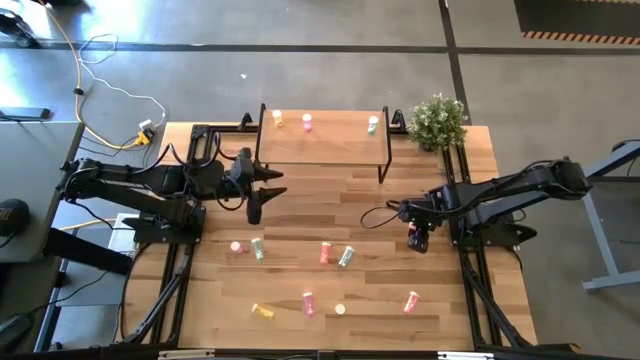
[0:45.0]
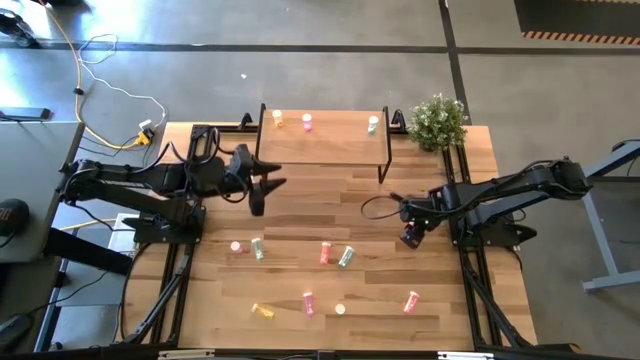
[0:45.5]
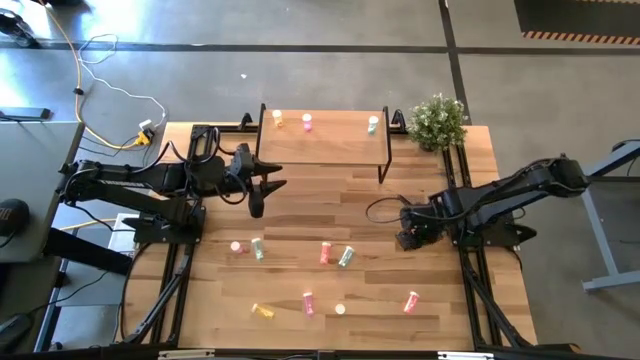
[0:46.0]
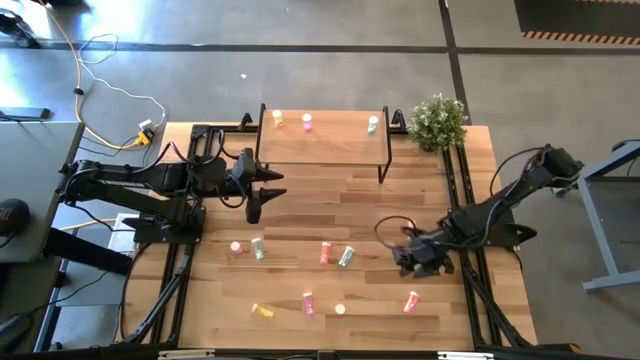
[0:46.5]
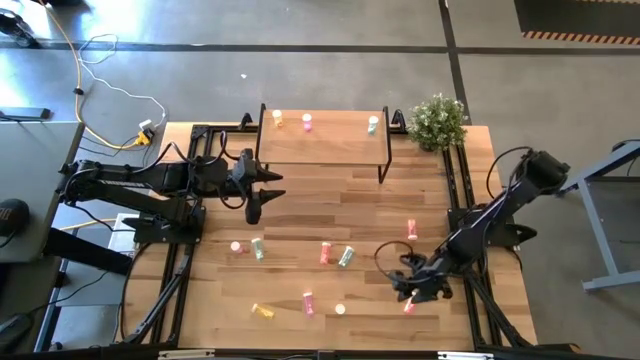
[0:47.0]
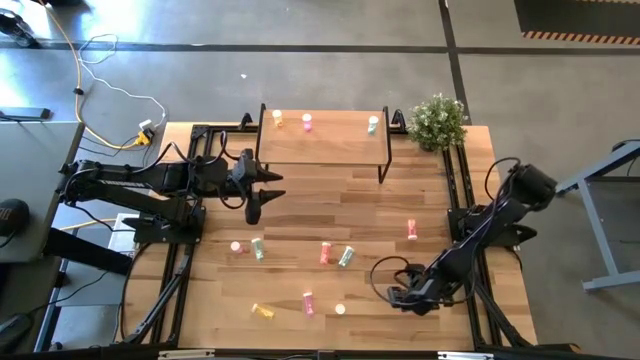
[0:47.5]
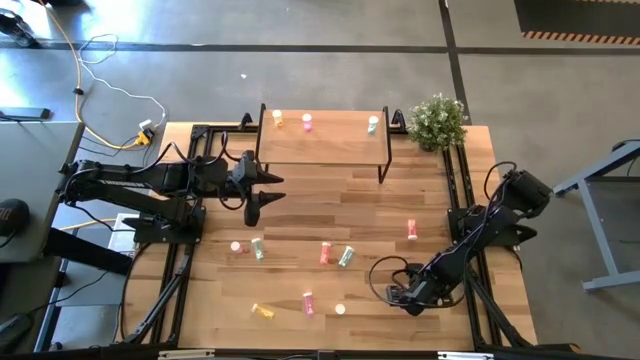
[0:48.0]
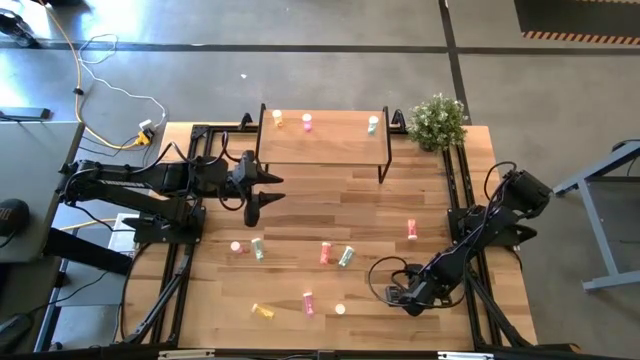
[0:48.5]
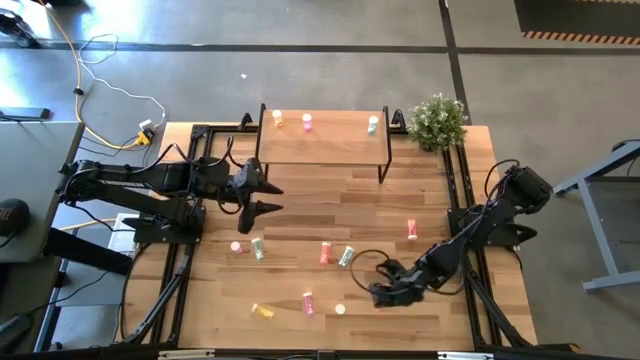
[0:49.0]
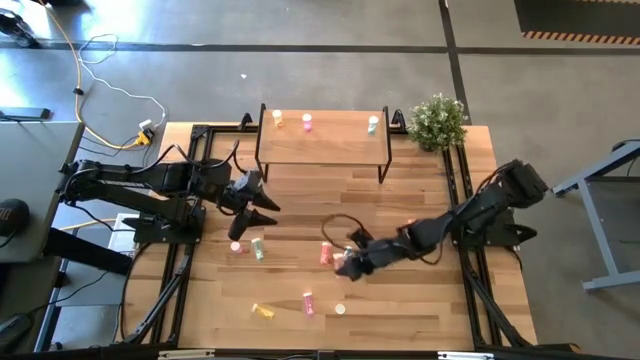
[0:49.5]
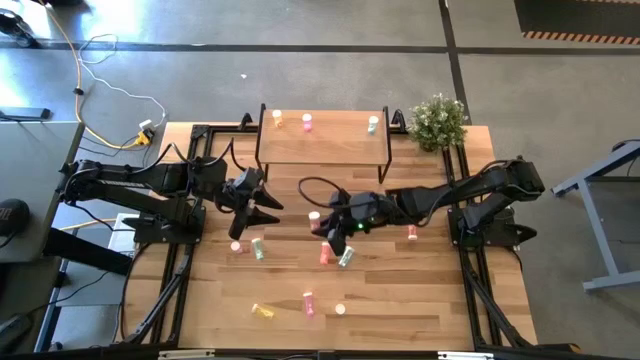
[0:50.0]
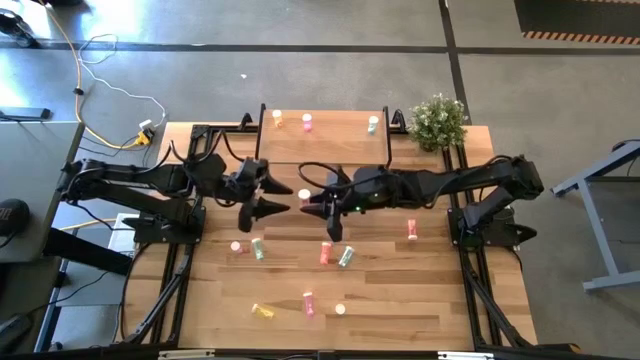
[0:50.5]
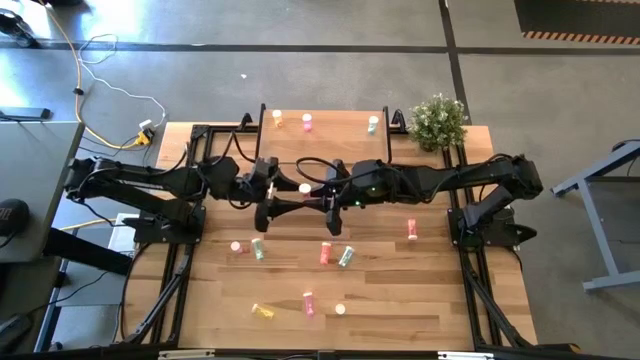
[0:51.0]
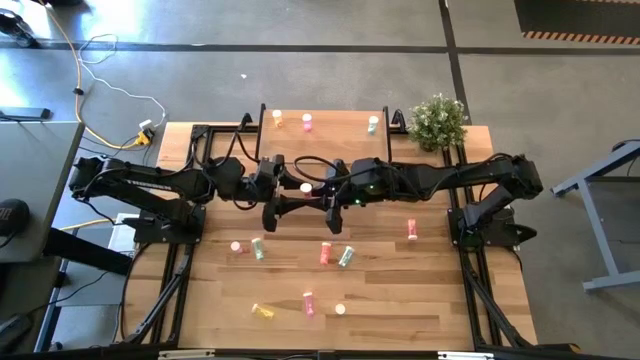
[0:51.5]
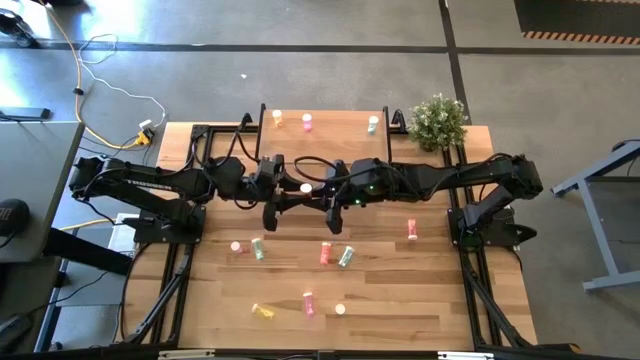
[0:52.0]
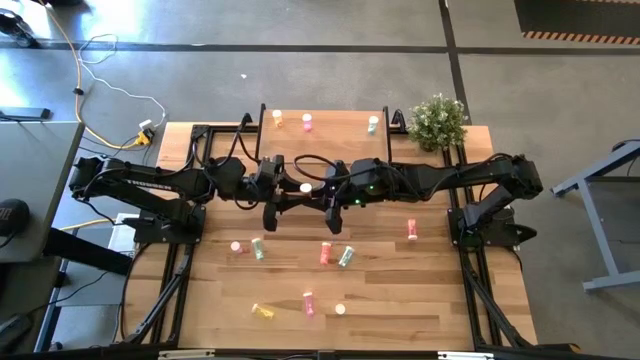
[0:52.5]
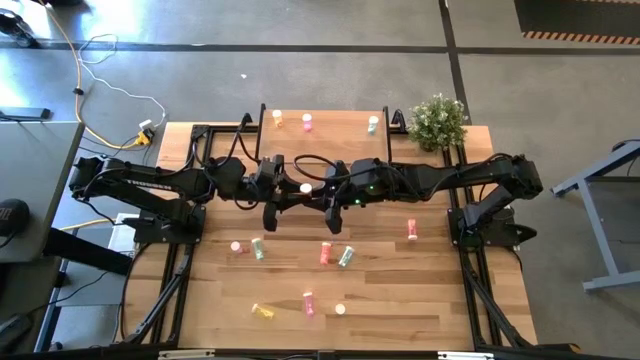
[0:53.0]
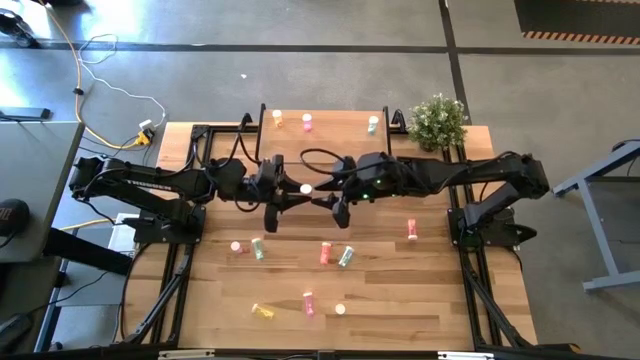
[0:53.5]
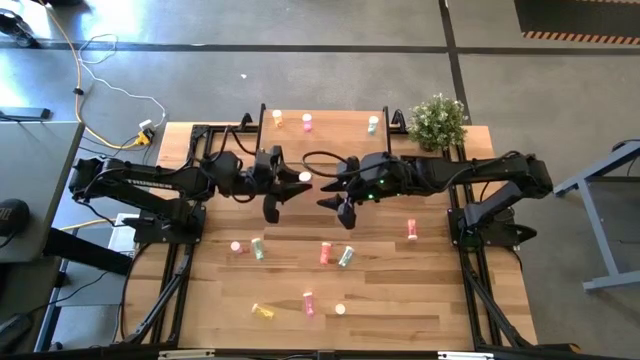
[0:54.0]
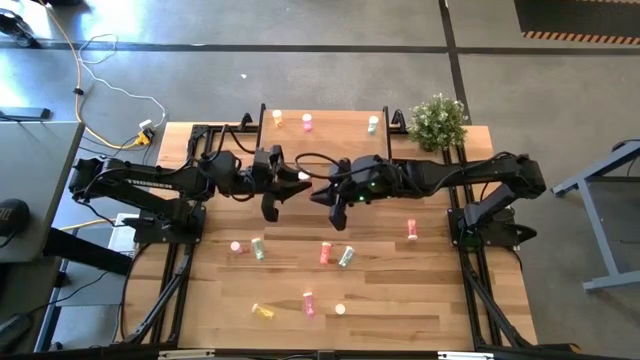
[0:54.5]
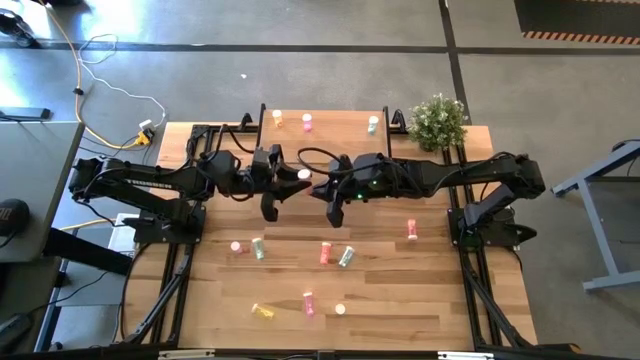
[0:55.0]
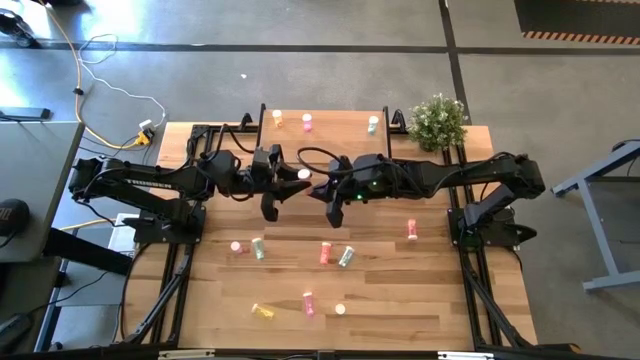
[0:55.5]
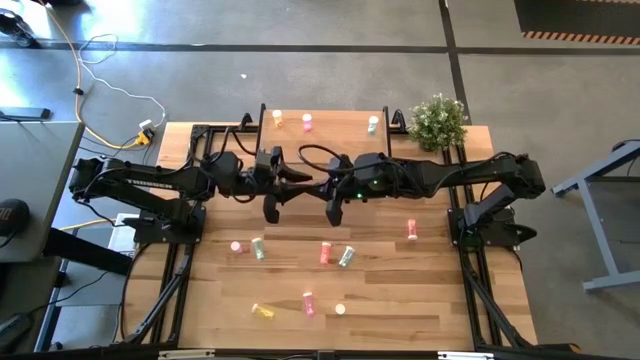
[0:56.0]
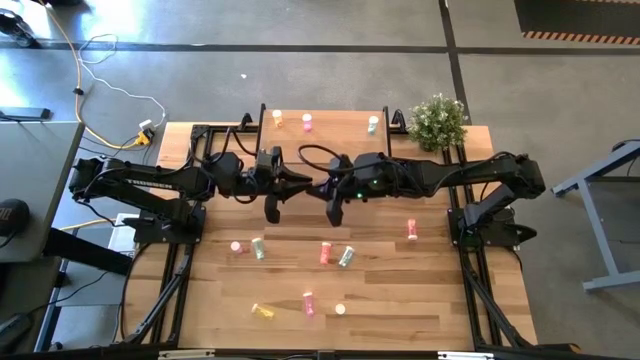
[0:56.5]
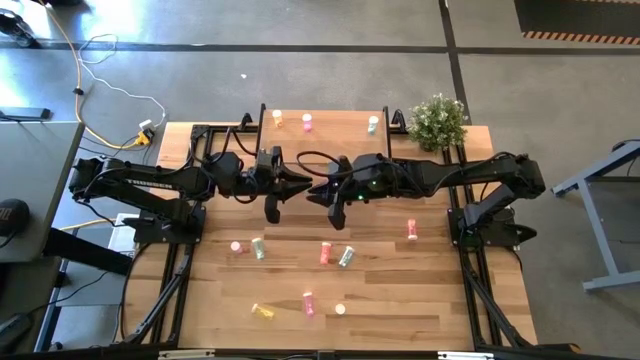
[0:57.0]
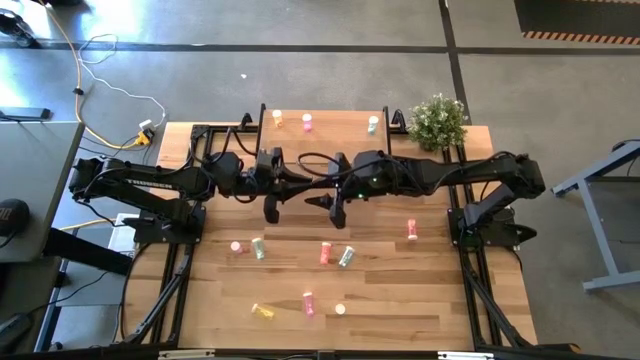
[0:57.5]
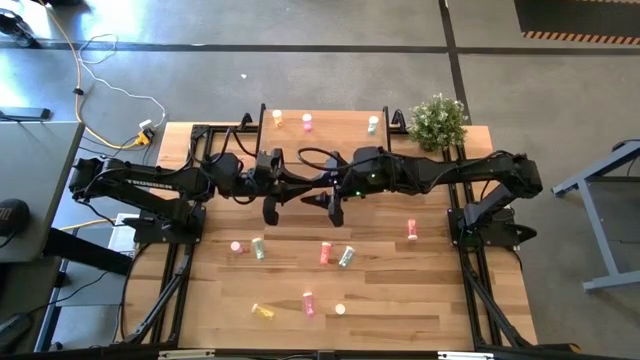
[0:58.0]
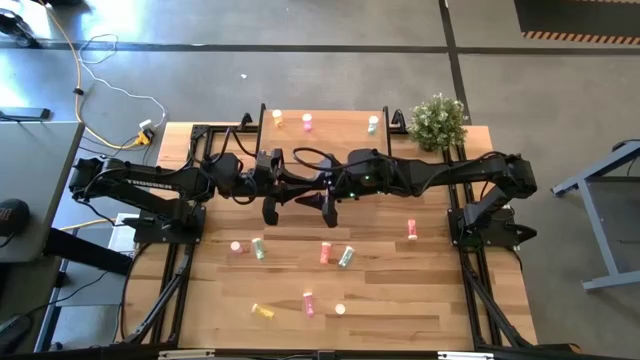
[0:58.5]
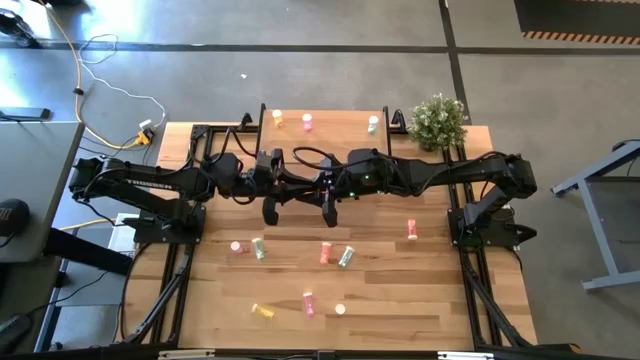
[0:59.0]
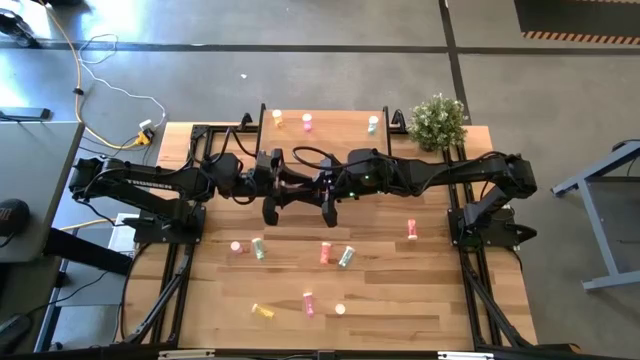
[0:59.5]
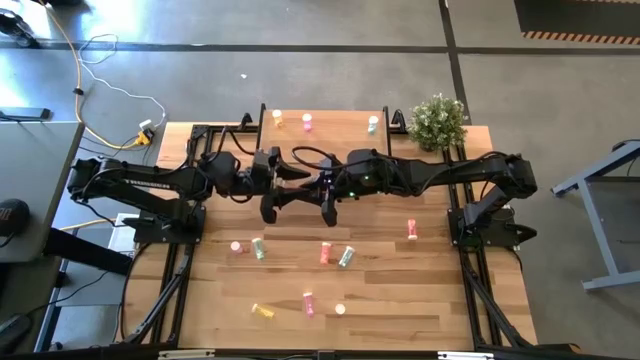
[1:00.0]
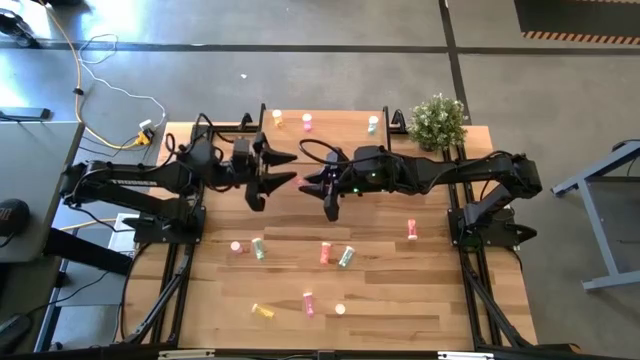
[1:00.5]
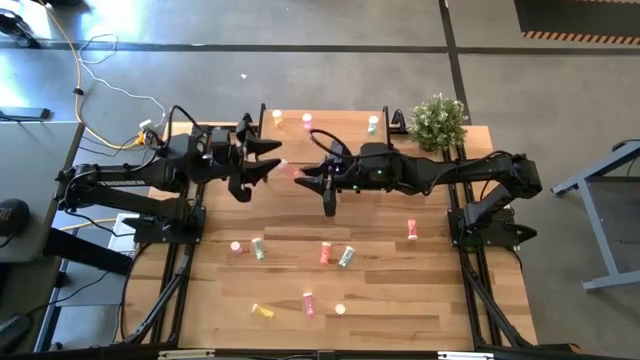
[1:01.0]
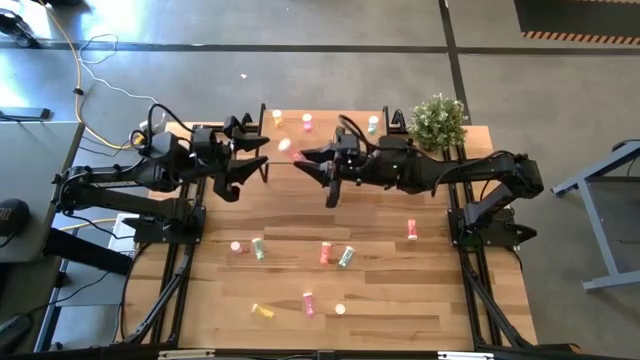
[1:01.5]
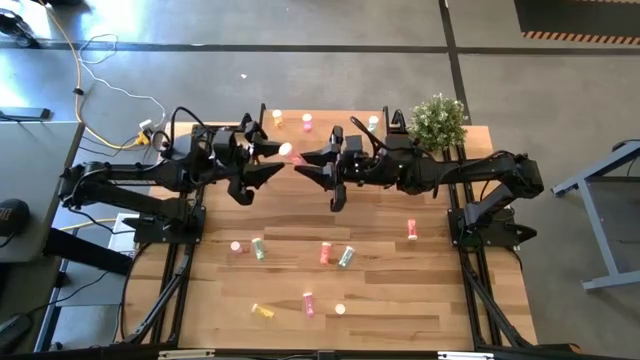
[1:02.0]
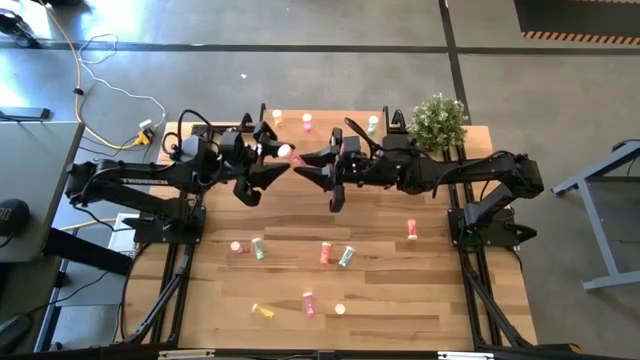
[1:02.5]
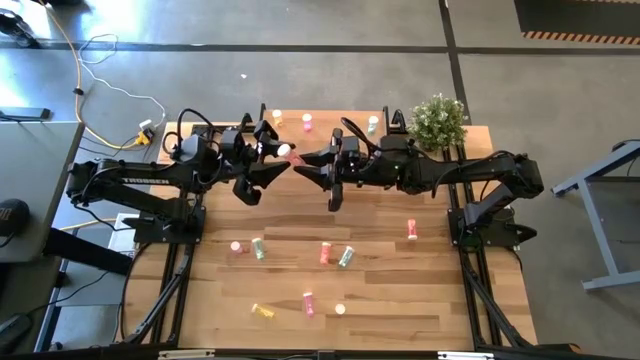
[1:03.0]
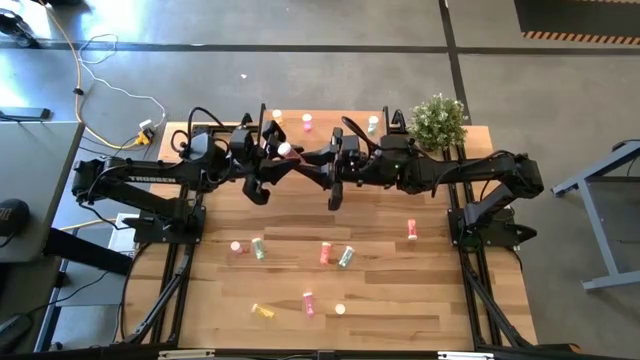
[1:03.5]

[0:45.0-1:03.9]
Task: Pick and place medicine bottles onto shelf by color
Put the bottom pink pill bottle on the shelf
